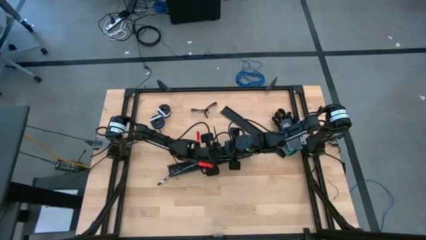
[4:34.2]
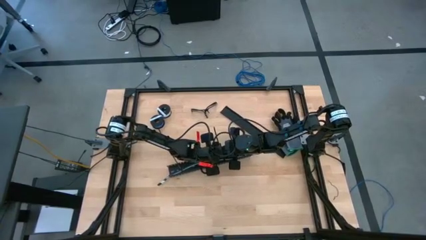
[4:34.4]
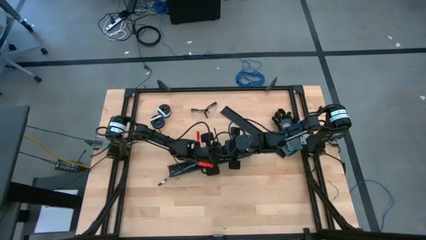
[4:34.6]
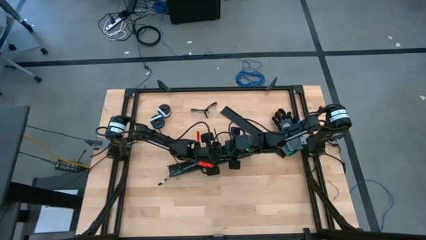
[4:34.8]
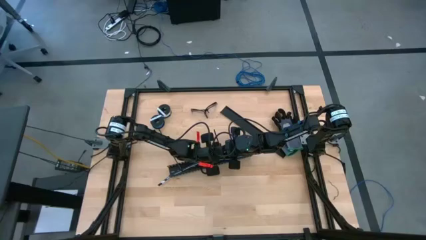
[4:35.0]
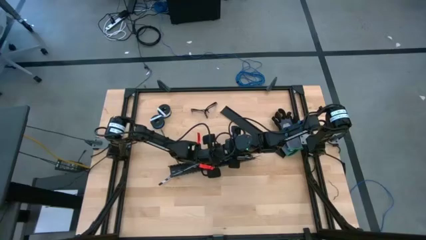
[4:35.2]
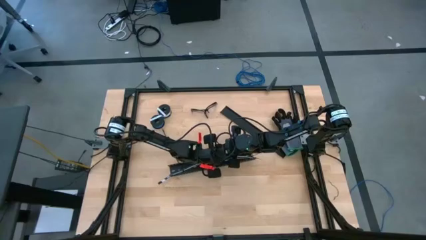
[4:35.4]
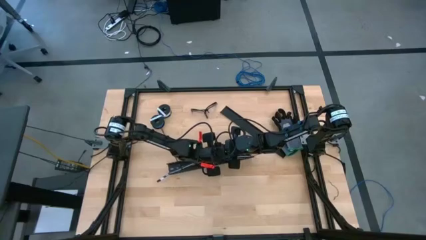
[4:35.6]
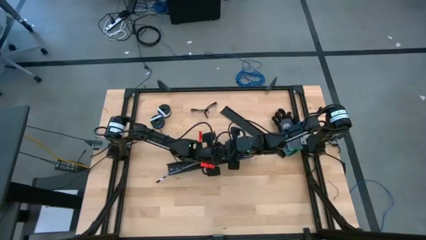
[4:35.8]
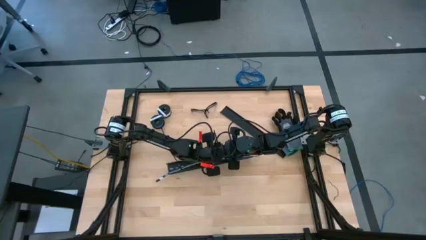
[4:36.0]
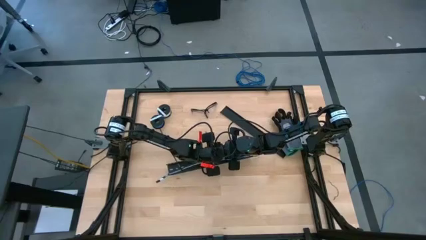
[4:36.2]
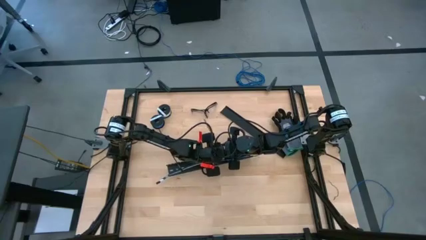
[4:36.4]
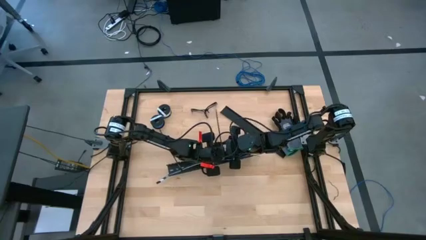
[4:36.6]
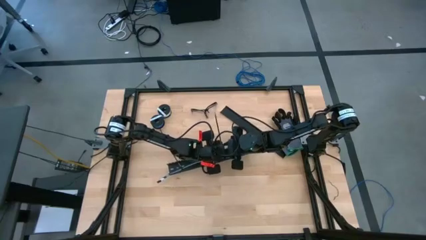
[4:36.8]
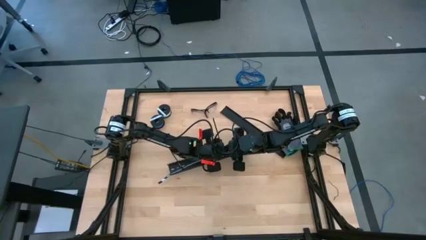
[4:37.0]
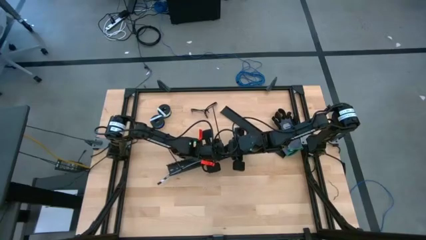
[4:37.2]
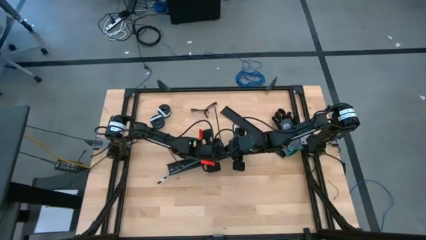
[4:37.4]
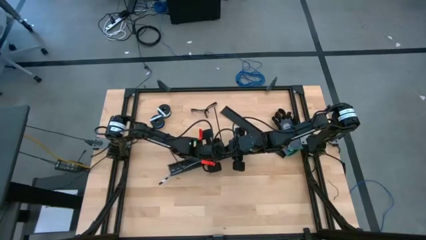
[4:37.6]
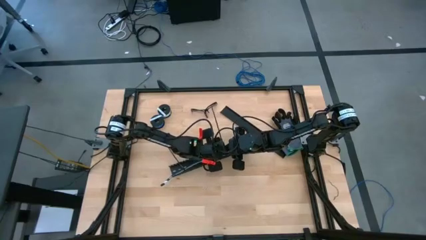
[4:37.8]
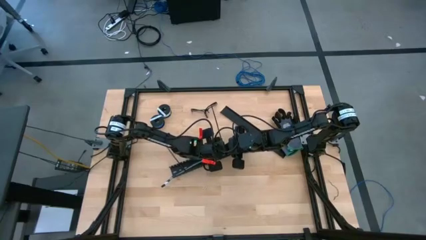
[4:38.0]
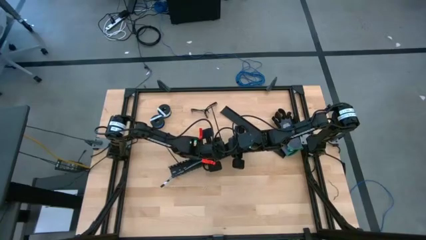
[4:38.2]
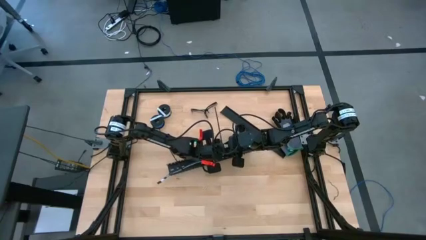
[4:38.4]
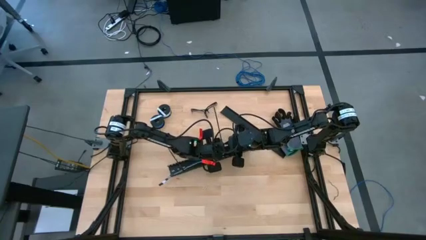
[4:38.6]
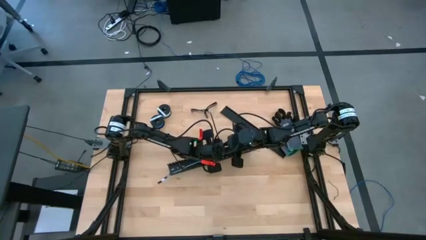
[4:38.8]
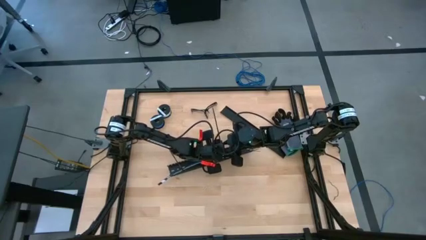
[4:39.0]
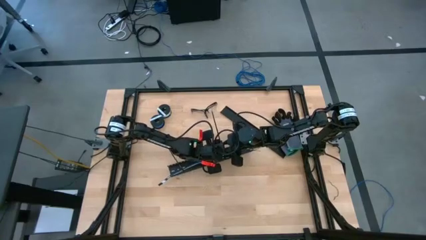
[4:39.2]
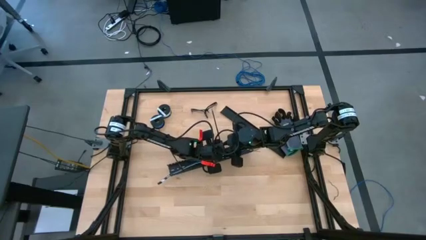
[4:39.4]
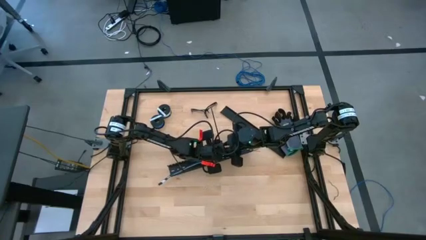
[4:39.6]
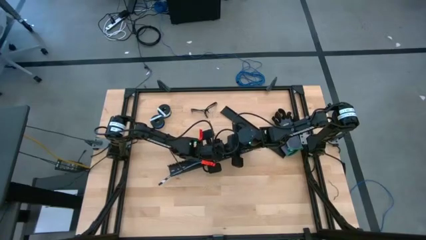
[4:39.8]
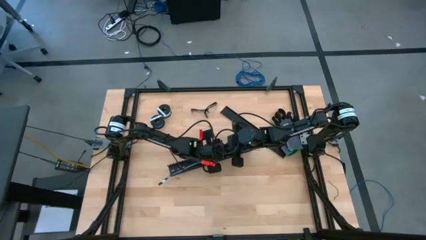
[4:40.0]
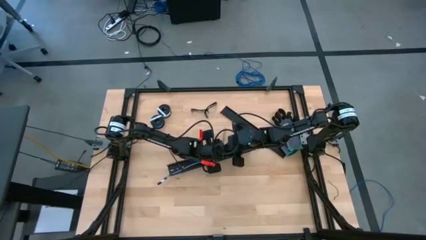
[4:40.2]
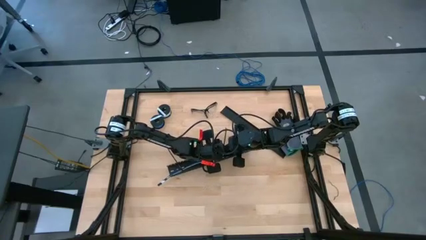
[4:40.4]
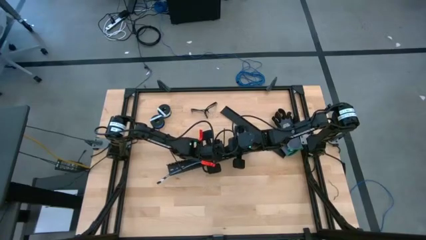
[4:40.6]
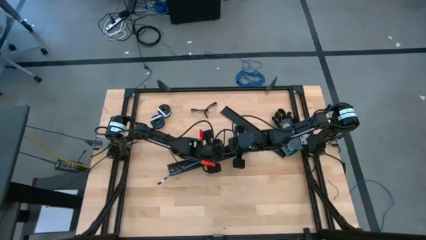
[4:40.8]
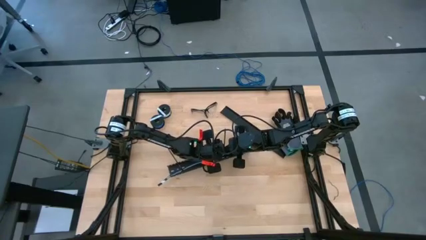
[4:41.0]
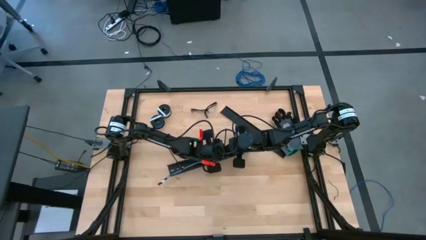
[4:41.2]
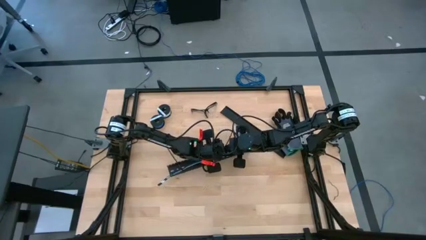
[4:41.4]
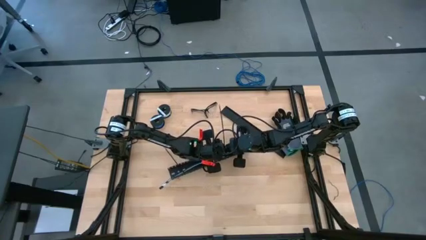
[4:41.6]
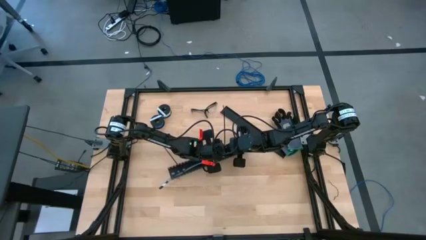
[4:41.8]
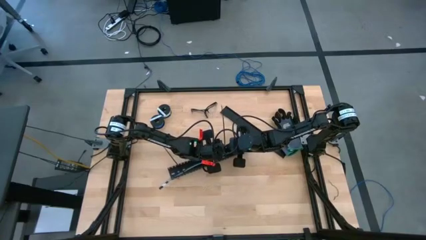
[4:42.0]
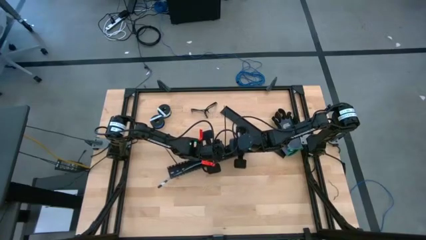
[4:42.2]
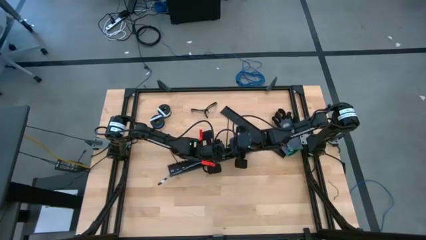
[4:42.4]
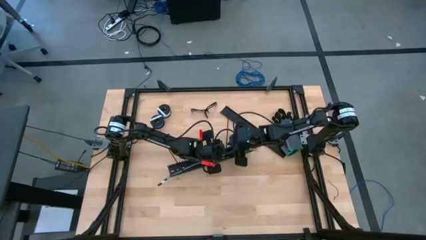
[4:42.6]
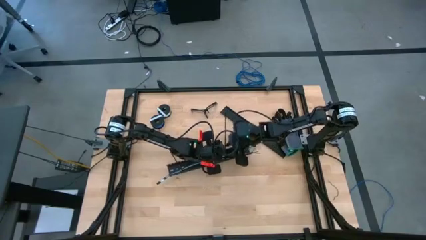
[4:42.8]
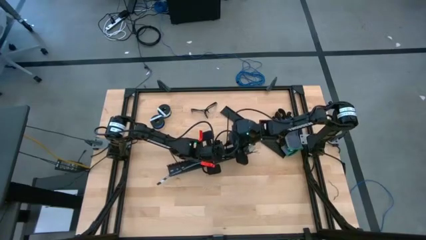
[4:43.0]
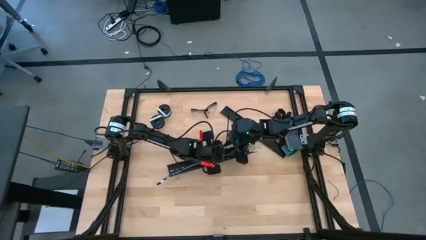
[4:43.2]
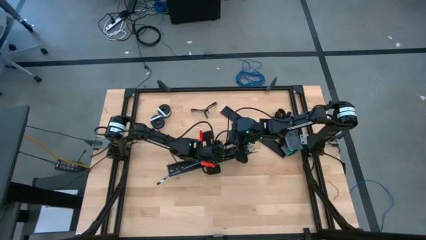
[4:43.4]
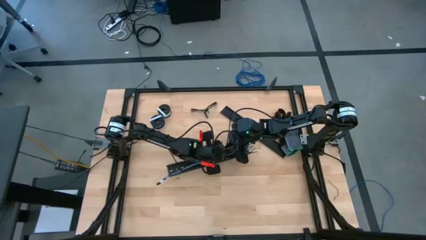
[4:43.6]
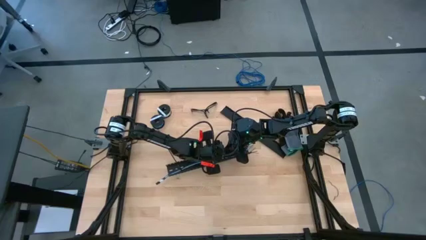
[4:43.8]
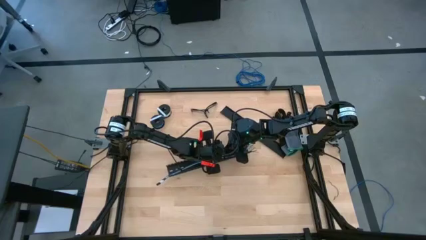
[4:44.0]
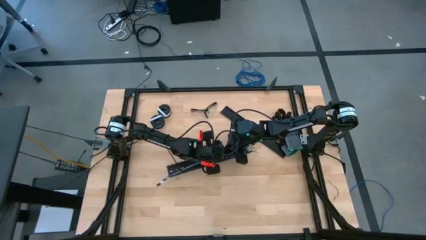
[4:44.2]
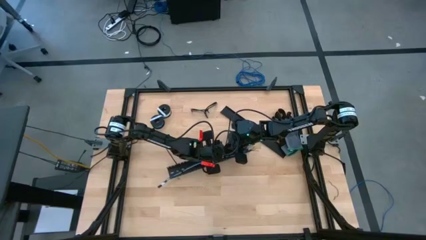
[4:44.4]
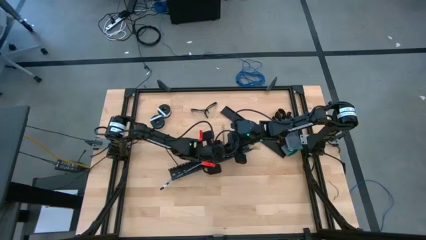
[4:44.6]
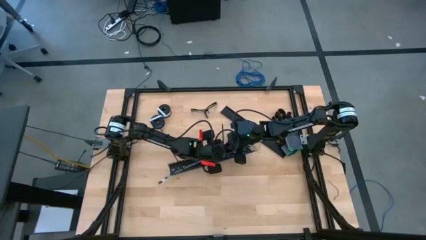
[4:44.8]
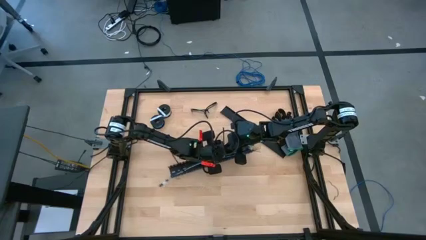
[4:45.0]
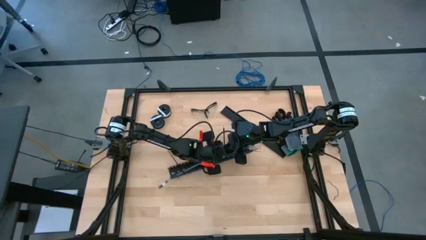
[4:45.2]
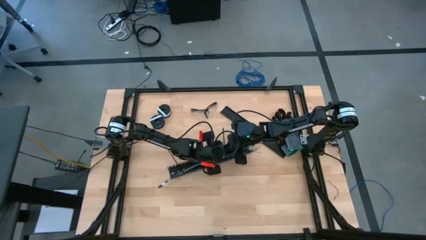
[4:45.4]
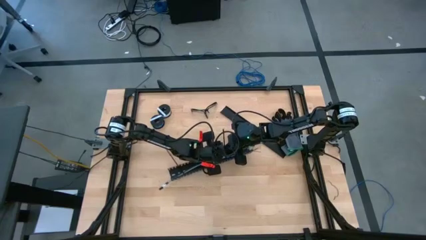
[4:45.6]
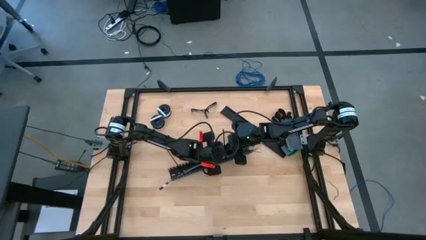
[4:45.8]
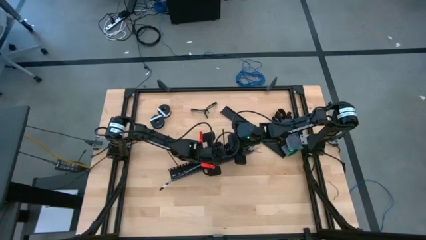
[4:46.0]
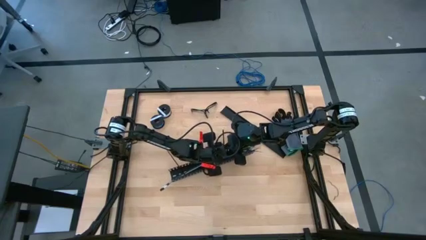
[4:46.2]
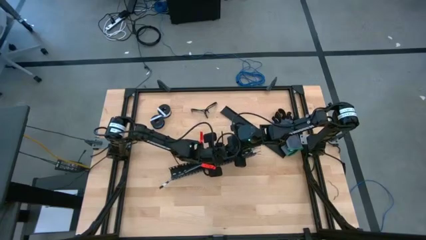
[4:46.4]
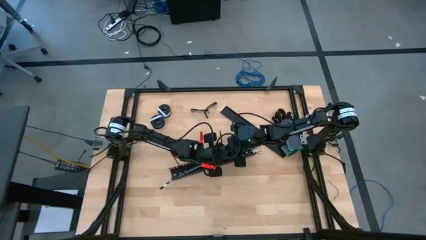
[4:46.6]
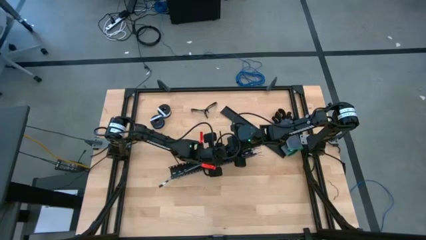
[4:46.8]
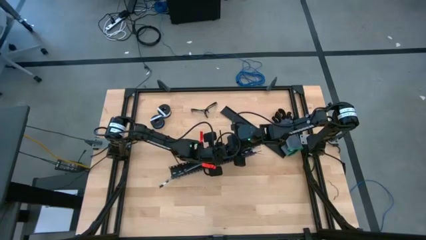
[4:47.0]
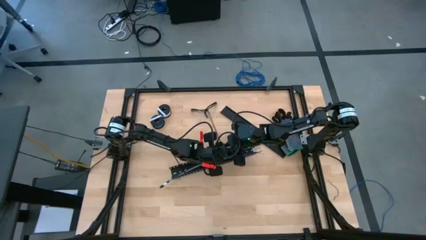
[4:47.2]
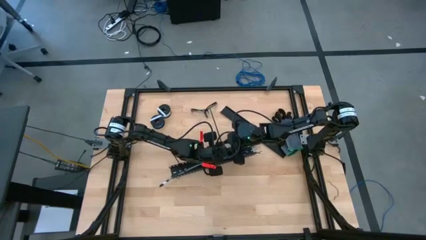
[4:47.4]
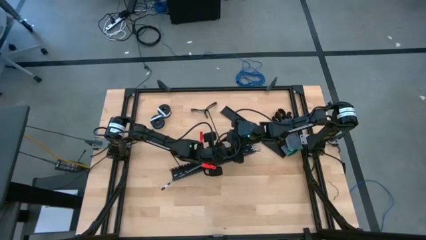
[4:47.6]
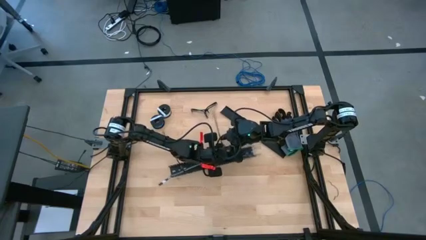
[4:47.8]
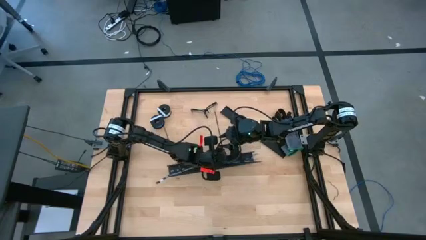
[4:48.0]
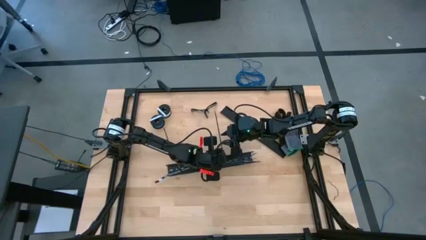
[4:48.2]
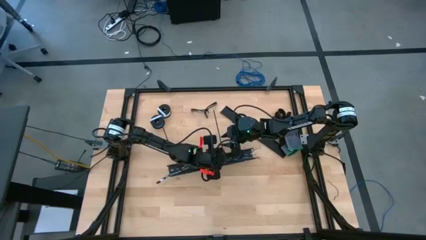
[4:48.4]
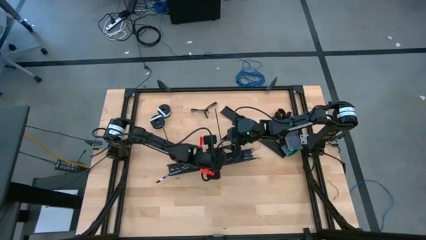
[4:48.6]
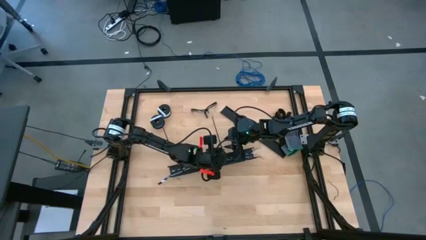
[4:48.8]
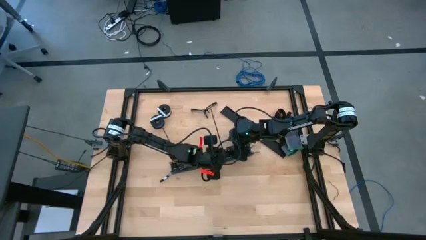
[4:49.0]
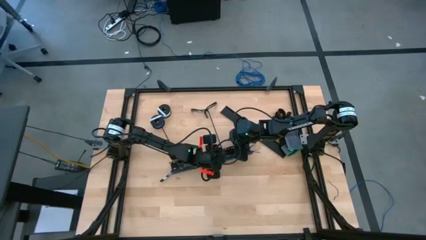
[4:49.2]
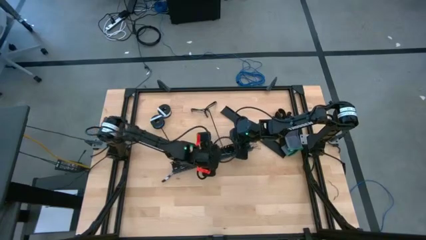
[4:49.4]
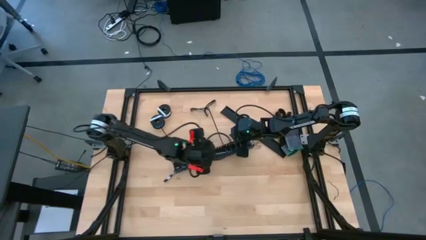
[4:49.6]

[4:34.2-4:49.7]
Task: Ziptie cables
Put the wrapped cables into the black cable duct
